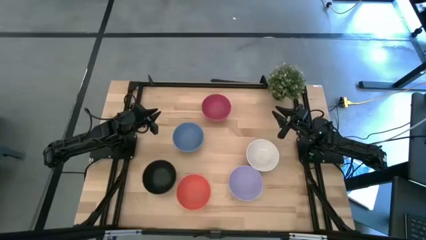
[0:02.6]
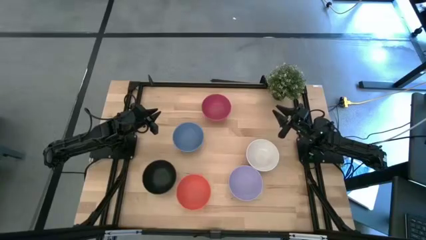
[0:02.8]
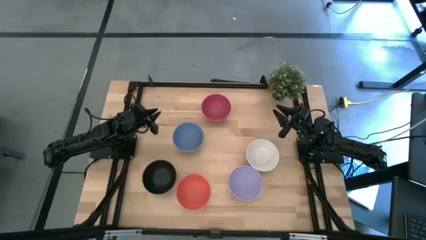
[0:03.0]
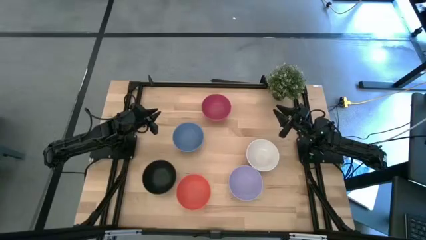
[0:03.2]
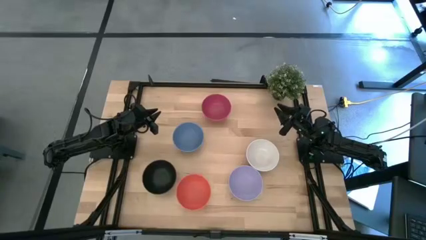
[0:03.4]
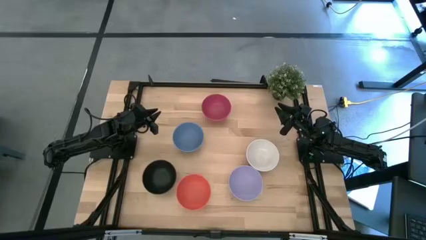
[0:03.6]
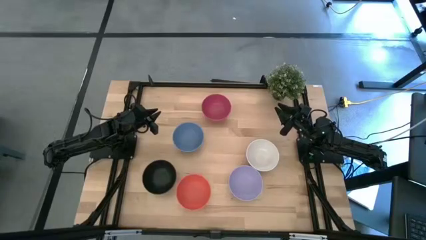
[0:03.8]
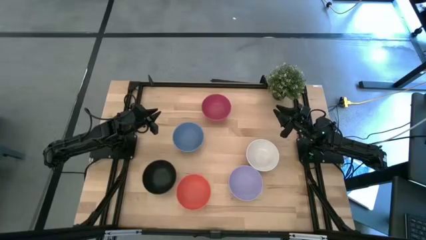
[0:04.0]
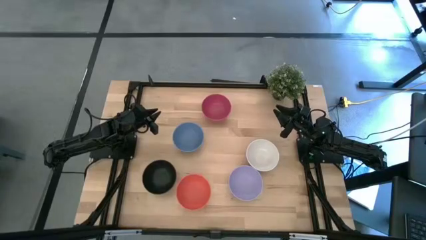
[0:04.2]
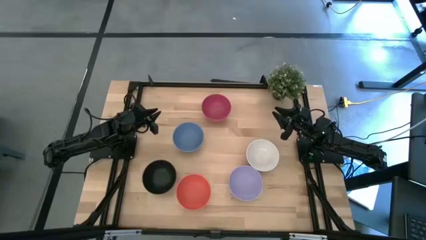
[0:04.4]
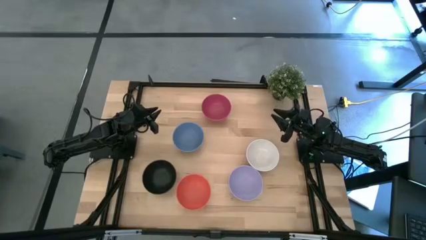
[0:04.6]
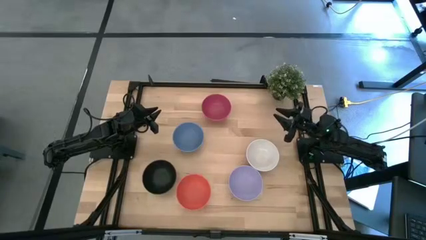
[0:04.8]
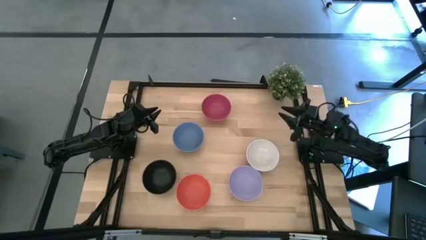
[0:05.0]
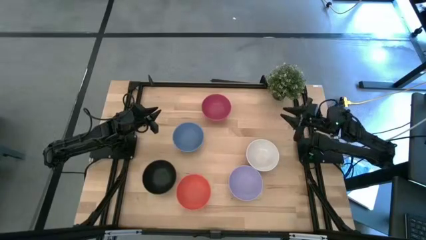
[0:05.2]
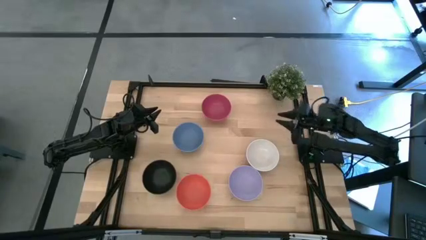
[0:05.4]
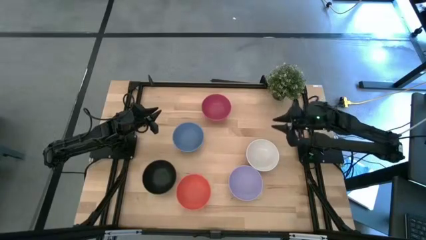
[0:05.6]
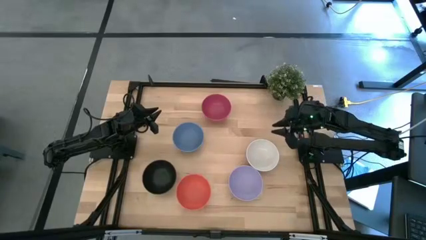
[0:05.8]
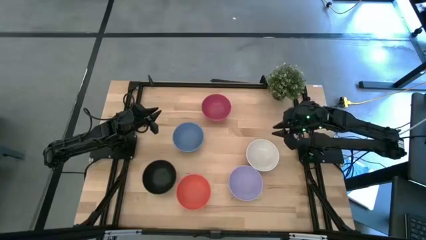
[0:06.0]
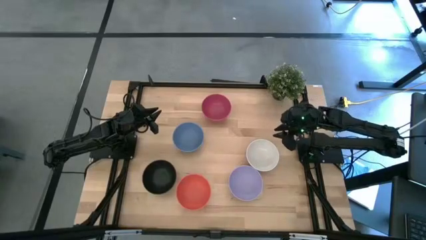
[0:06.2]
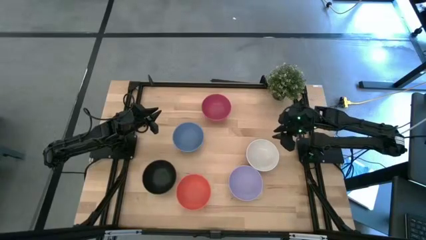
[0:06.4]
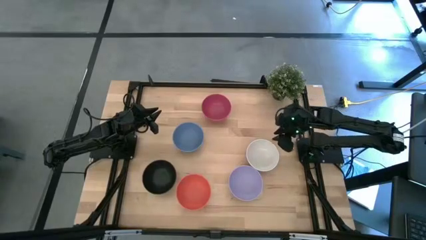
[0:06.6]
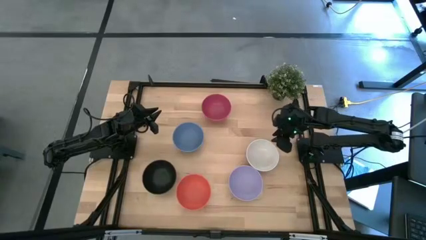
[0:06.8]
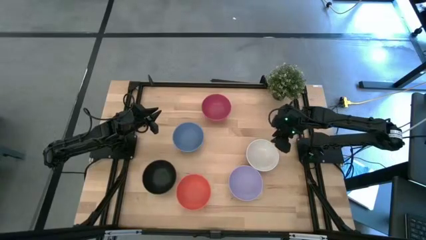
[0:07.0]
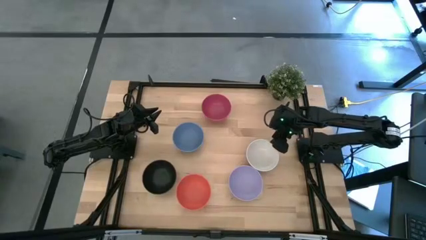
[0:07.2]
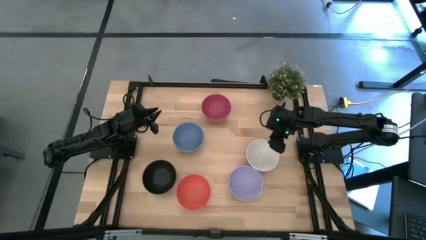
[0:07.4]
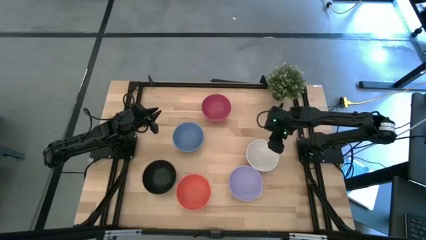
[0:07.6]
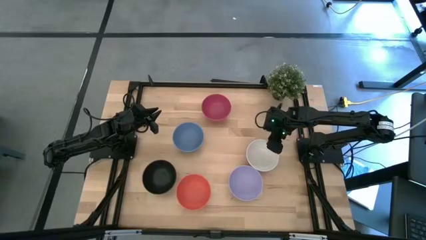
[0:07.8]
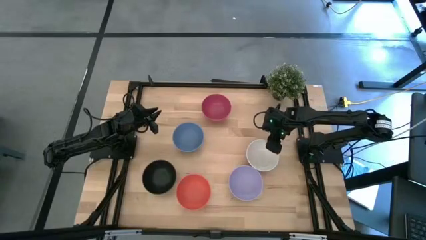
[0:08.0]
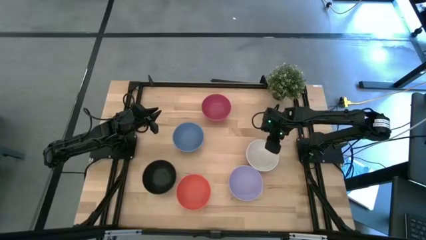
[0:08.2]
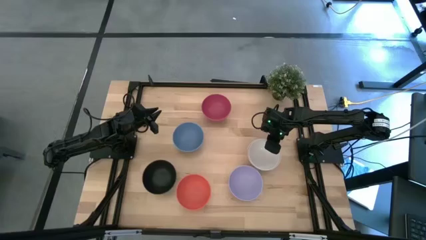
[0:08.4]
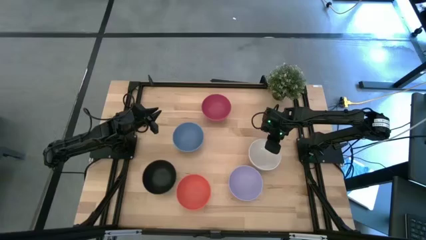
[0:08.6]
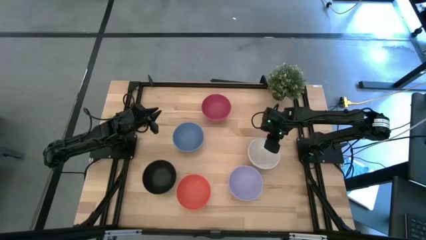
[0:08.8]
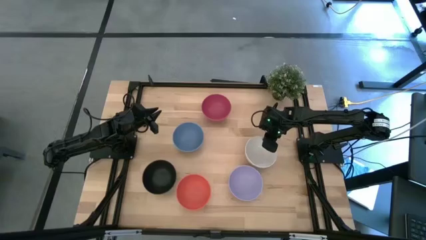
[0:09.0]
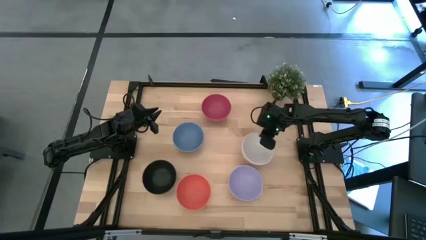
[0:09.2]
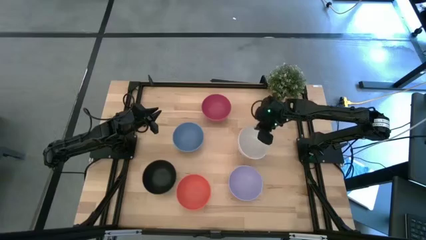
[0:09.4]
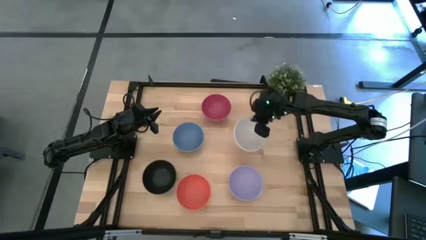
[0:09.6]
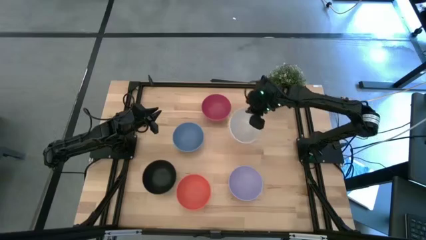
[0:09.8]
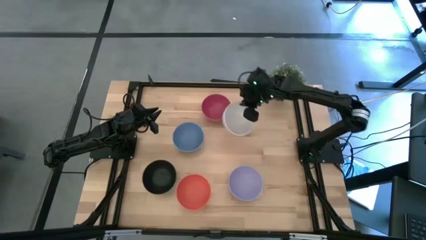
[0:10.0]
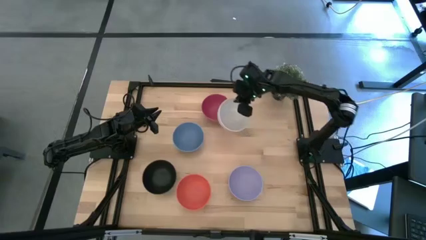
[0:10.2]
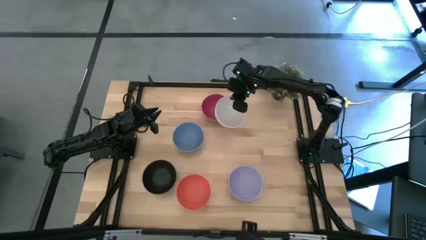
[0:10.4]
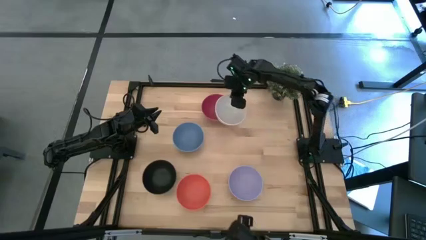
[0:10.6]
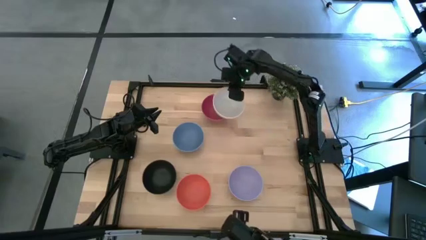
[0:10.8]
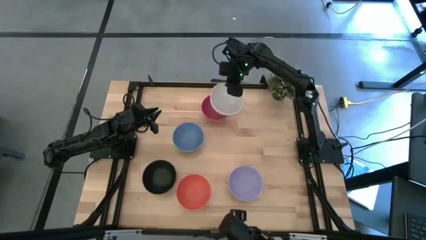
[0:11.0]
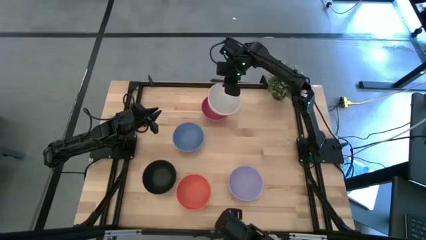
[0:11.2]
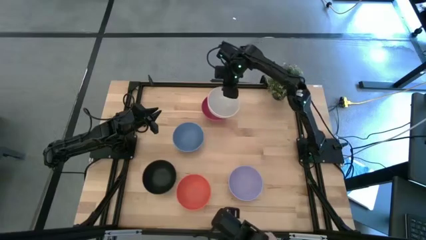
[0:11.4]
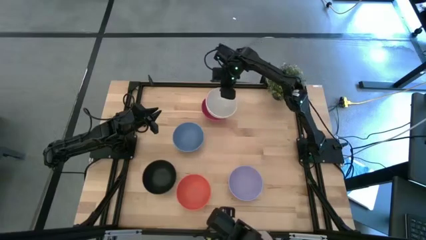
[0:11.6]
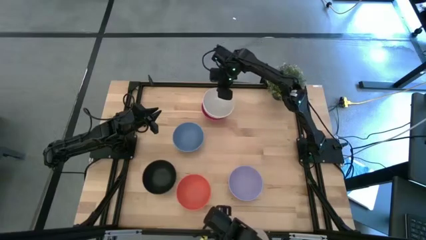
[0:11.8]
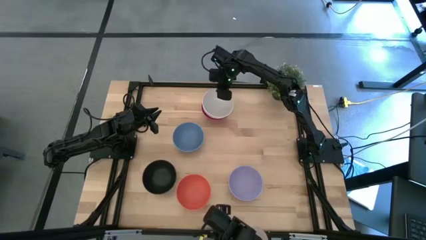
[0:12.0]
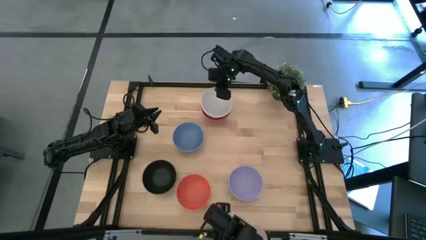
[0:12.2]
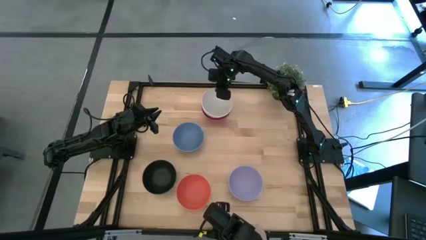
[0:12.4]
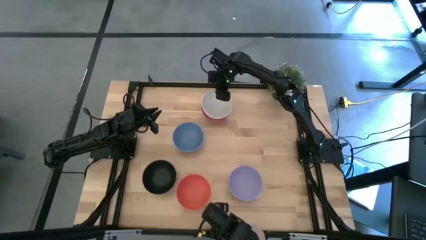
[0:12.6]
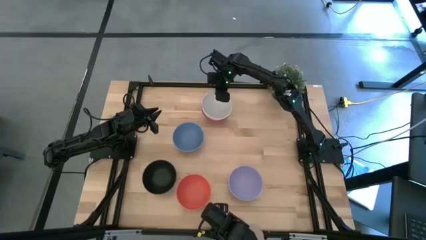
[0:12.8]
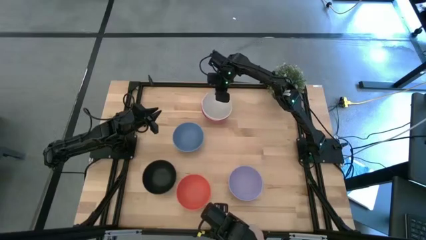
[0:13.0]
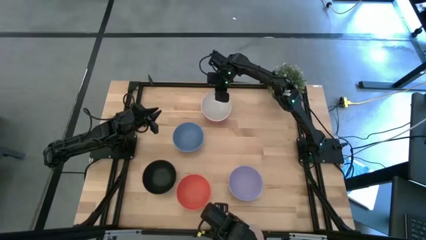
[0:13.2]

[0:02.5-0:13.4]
Task: Nest bowls inside each other
Stack the white bowl on top of the pink bowl

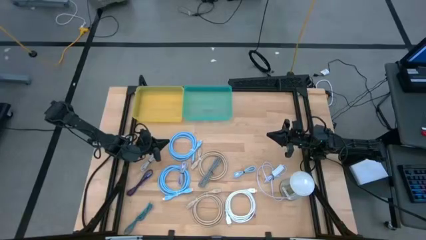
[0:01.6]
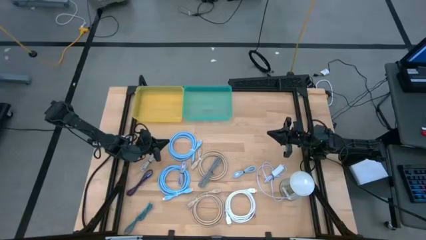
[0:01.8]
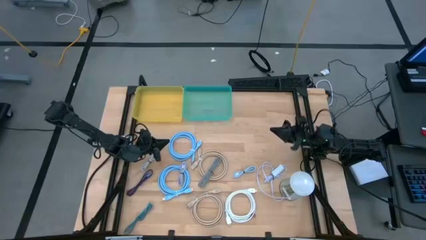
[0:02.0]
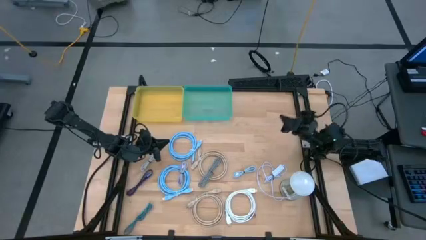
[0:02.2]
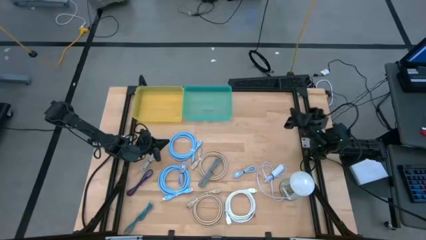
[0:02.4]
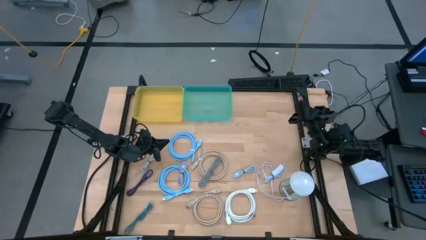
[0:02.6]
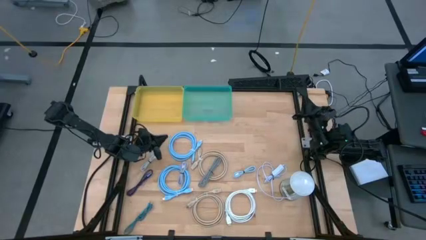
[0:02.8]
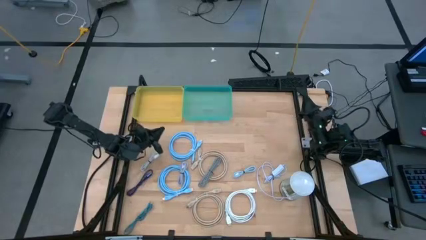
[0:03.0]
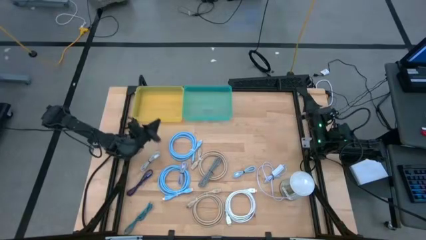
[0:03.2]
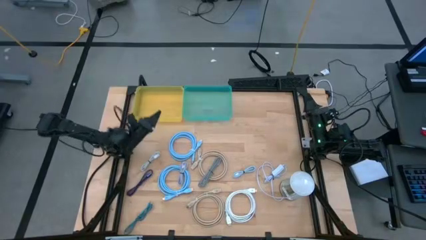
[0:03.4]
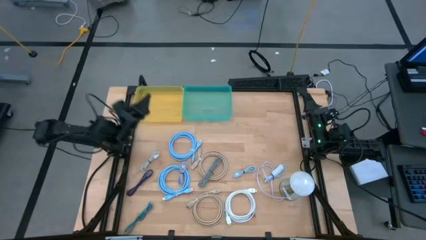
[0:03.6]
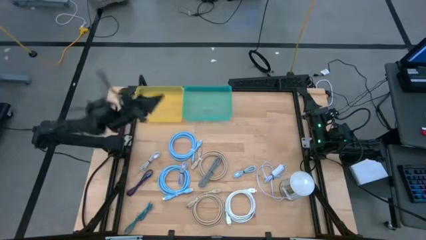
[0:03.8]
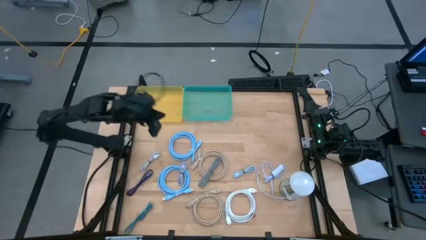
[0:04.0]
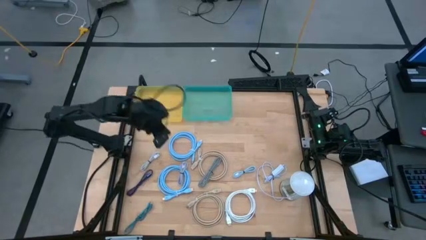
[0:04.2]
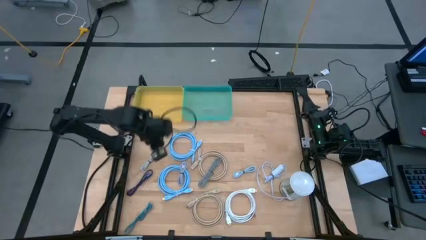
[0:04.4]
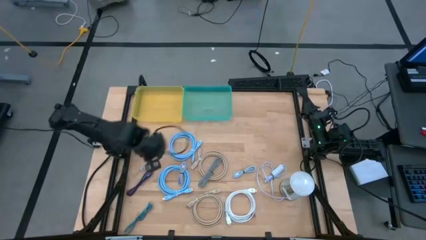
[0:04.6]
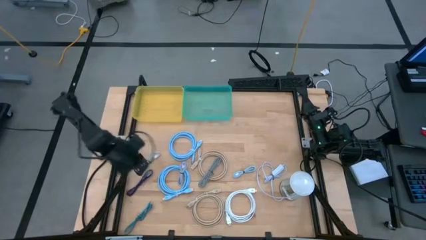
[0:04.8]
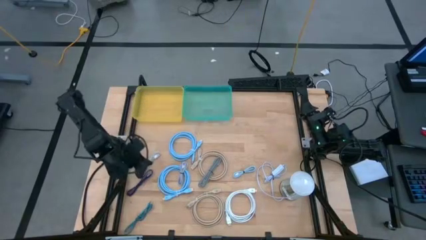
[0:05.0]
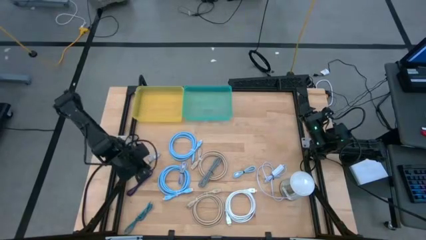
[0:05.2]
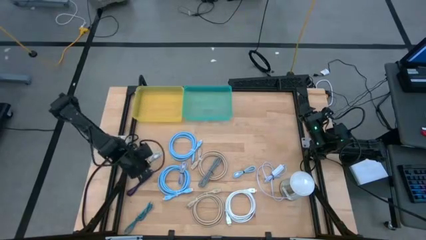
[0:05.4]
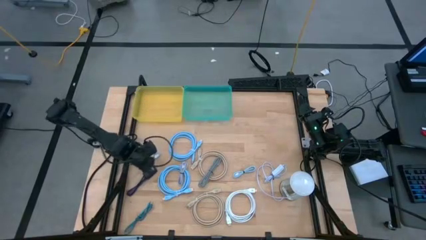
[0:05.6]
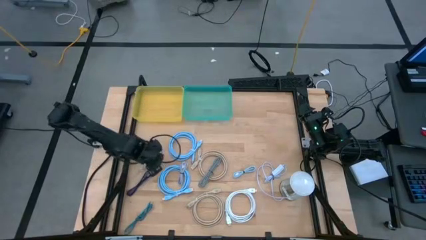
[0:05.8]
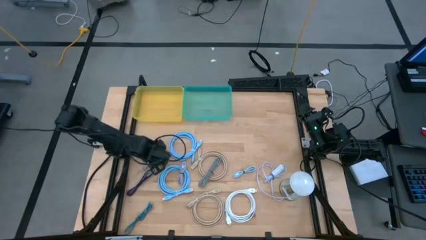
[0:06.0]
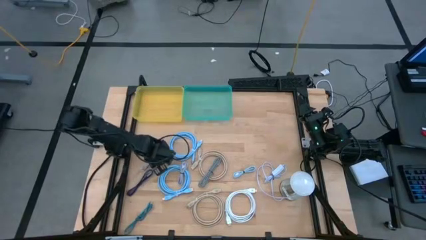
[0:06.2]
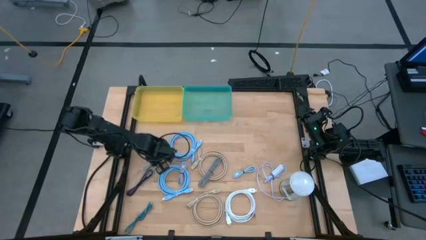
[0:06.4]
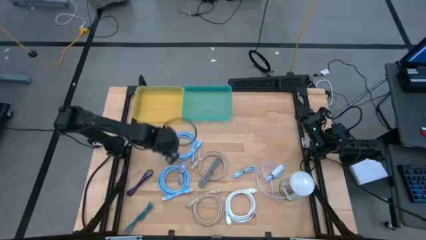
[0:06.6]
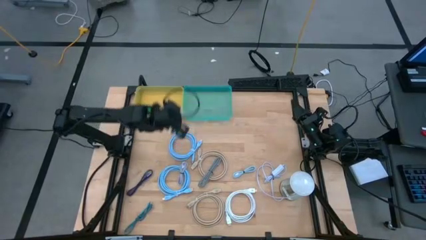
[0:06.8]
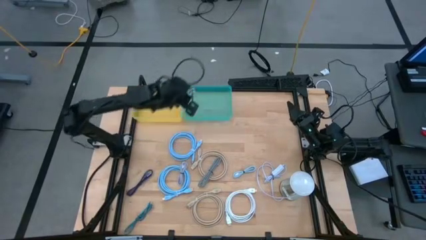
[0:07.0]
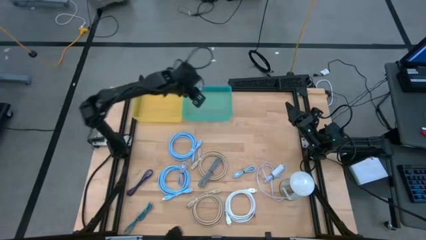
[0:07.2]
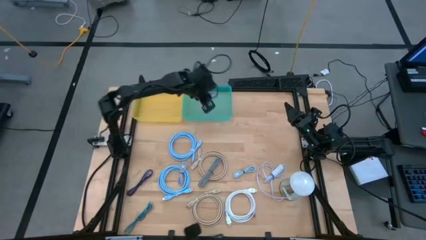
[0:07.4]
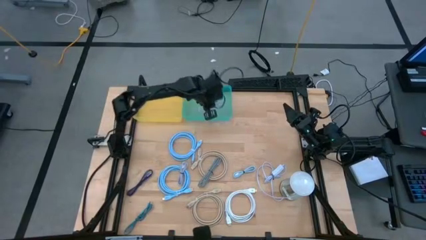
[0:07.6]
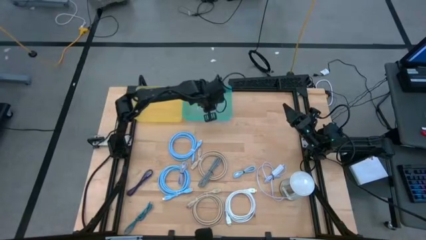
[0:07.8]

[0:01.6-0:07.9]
Task: Pick & Place USB Port
Put the left white charger cable into the green bin
